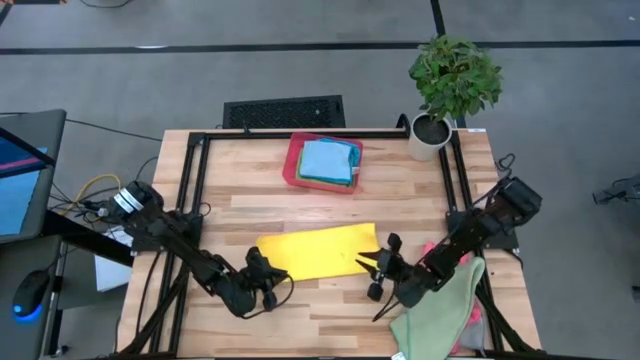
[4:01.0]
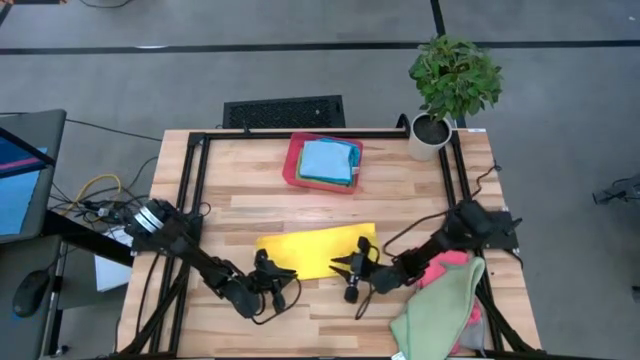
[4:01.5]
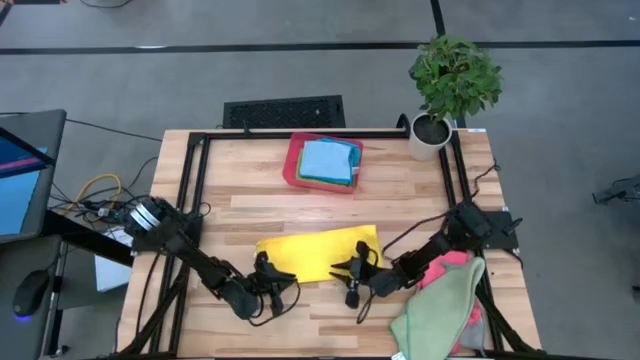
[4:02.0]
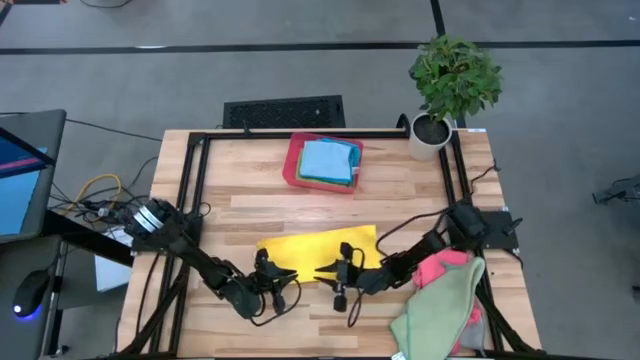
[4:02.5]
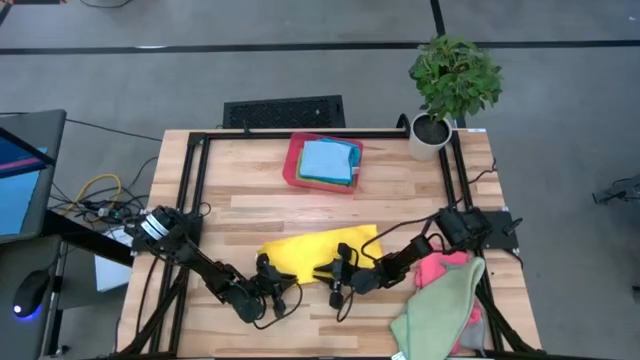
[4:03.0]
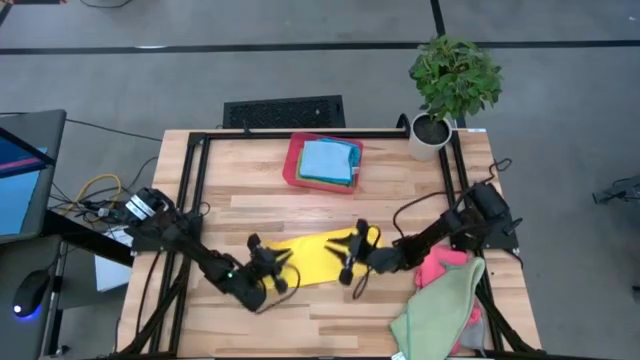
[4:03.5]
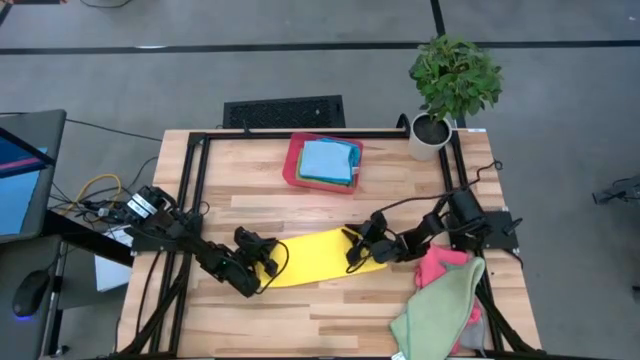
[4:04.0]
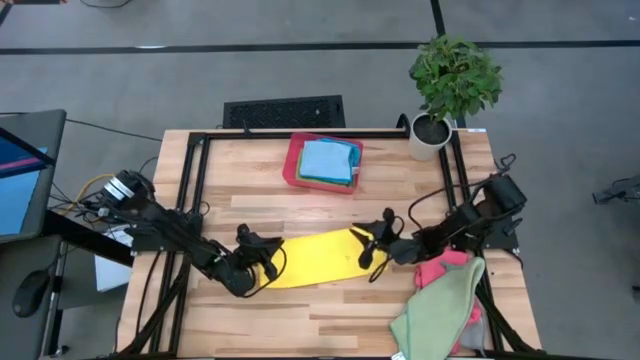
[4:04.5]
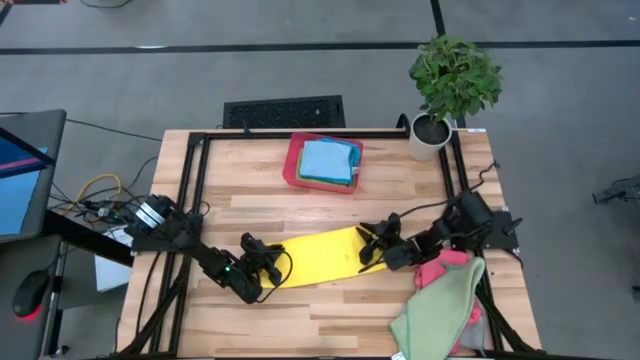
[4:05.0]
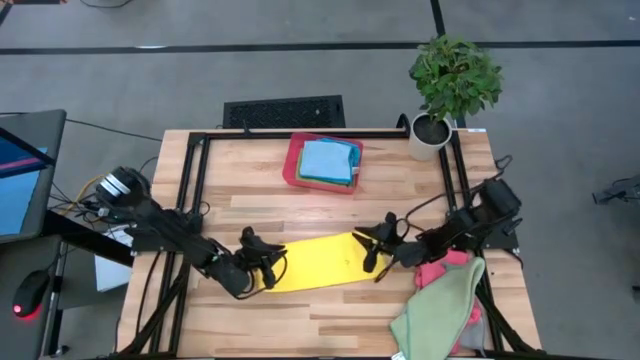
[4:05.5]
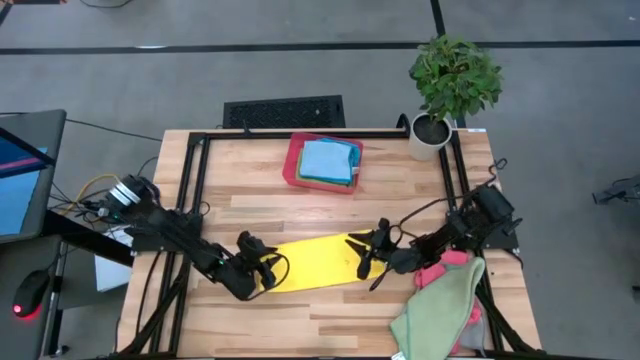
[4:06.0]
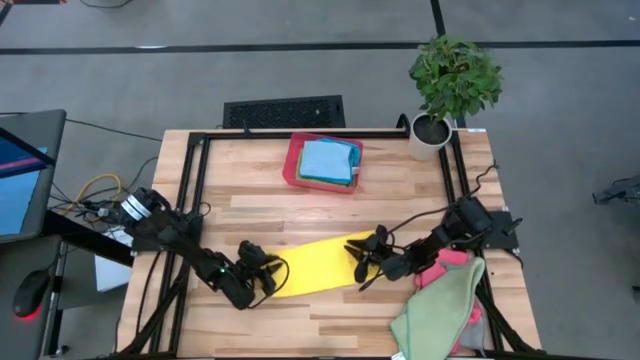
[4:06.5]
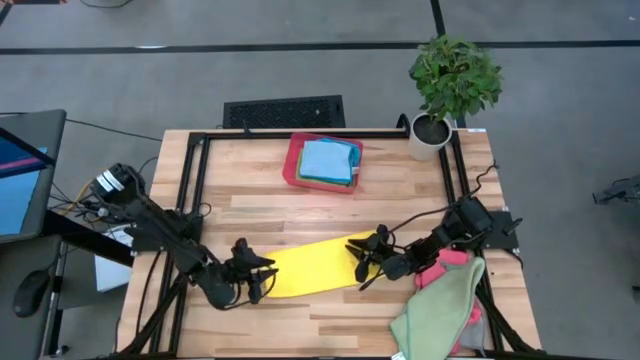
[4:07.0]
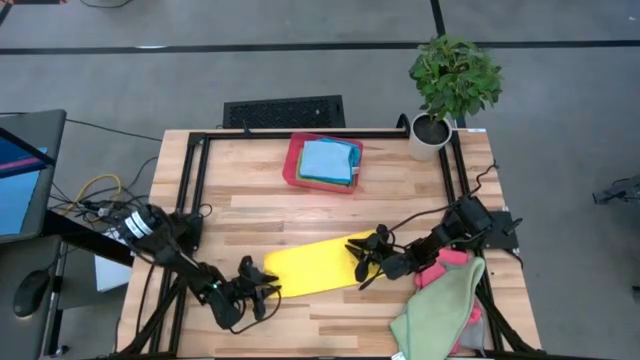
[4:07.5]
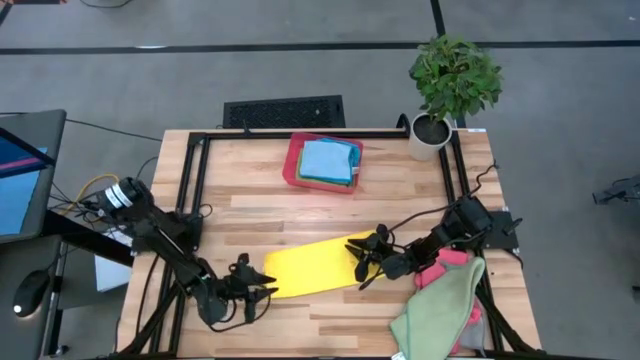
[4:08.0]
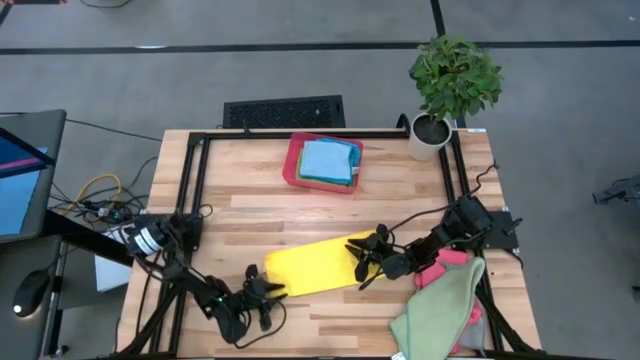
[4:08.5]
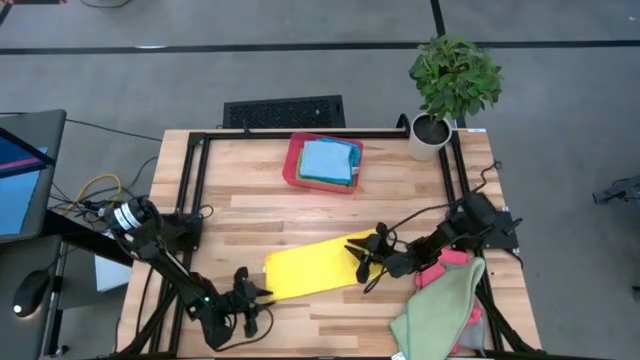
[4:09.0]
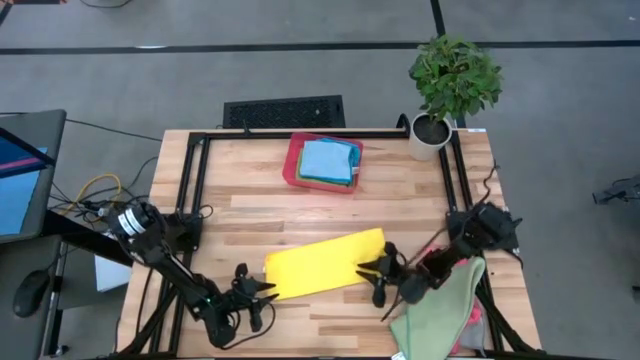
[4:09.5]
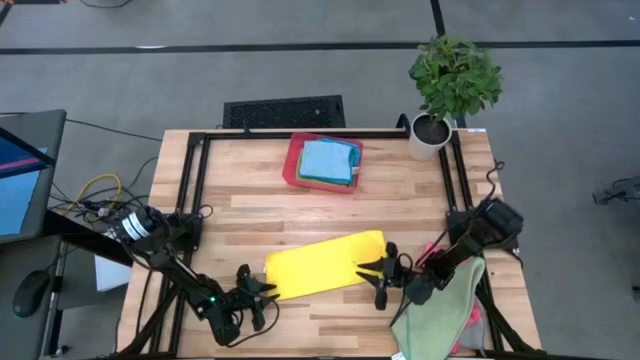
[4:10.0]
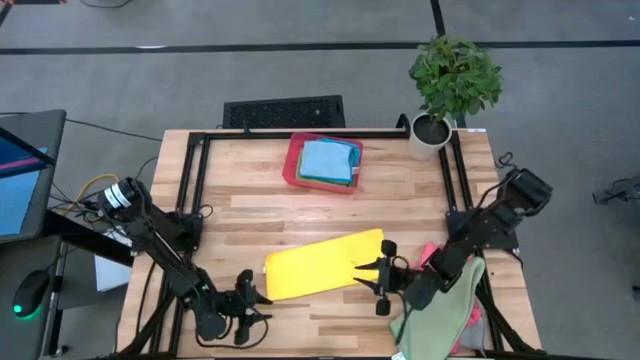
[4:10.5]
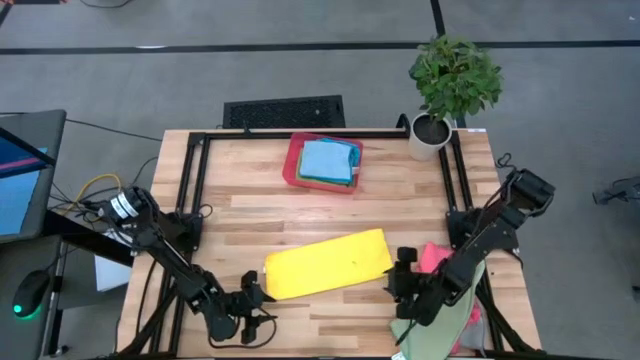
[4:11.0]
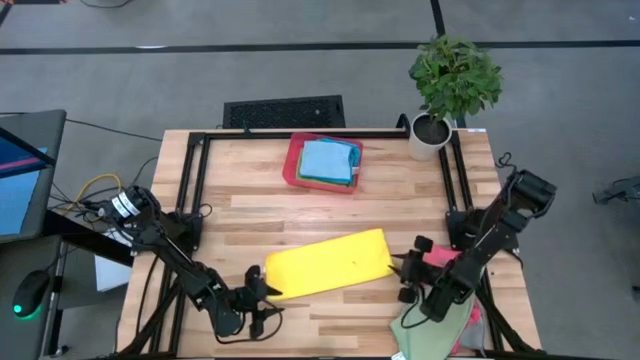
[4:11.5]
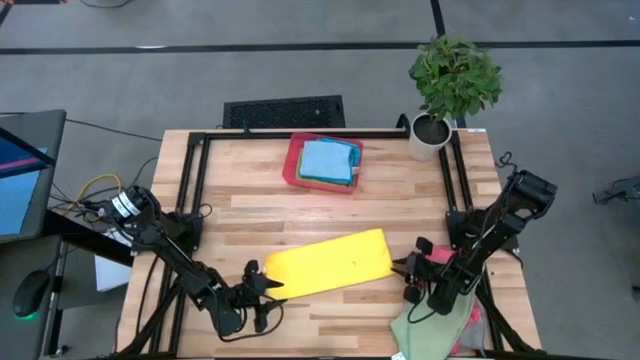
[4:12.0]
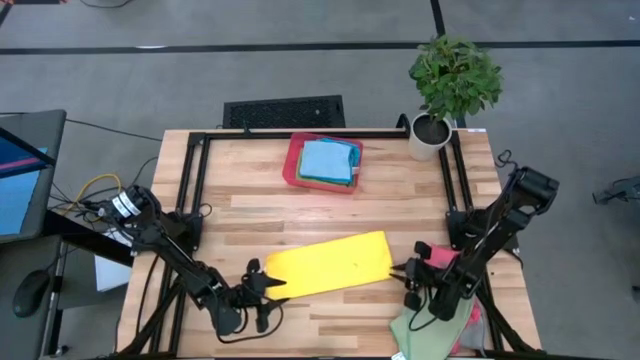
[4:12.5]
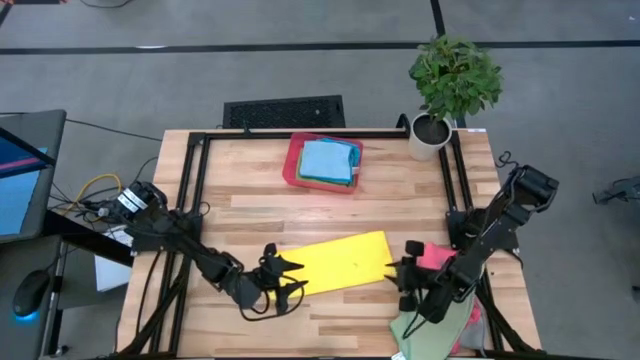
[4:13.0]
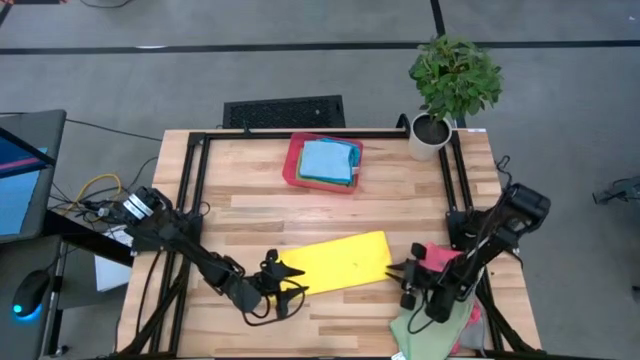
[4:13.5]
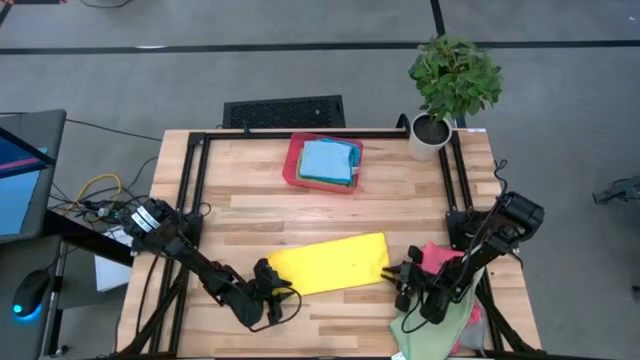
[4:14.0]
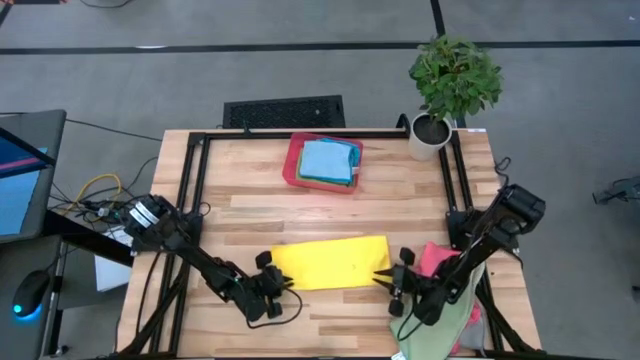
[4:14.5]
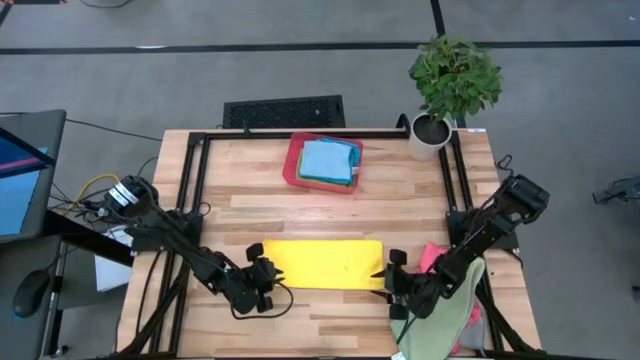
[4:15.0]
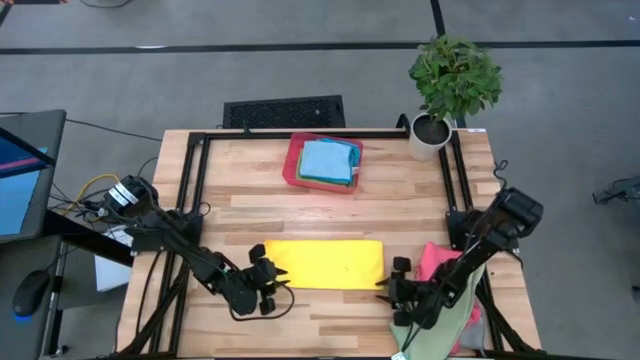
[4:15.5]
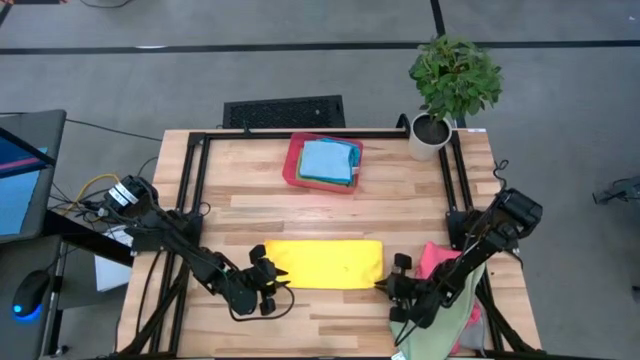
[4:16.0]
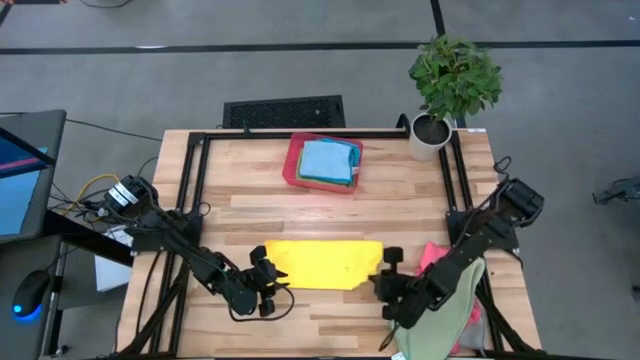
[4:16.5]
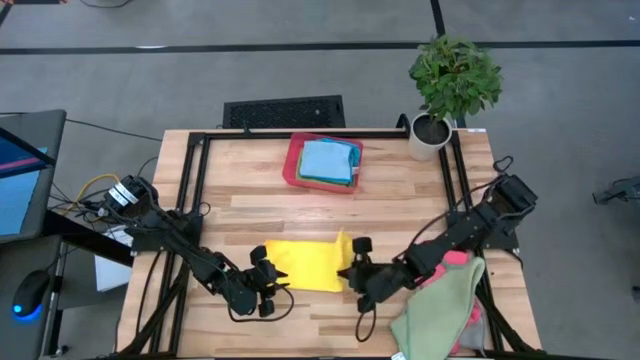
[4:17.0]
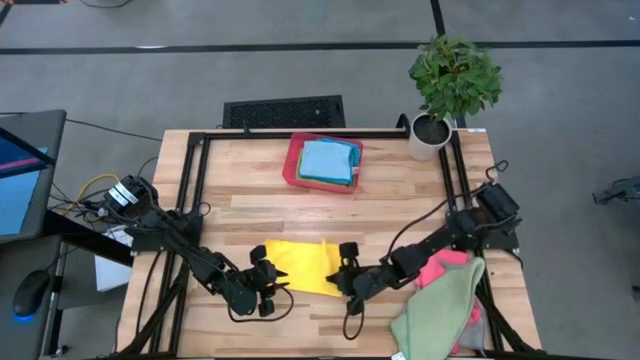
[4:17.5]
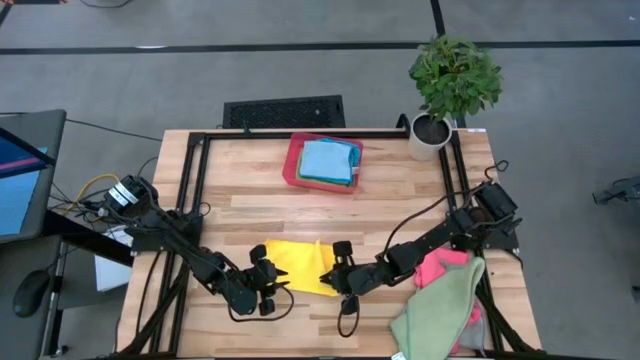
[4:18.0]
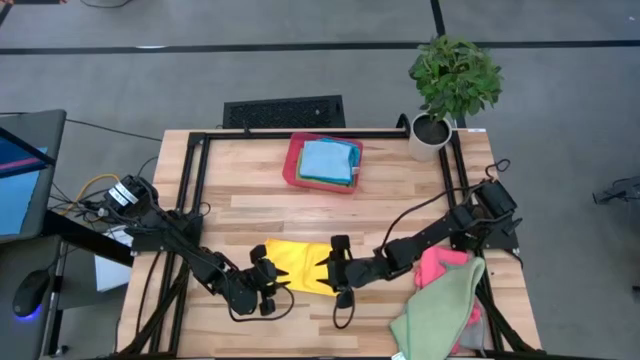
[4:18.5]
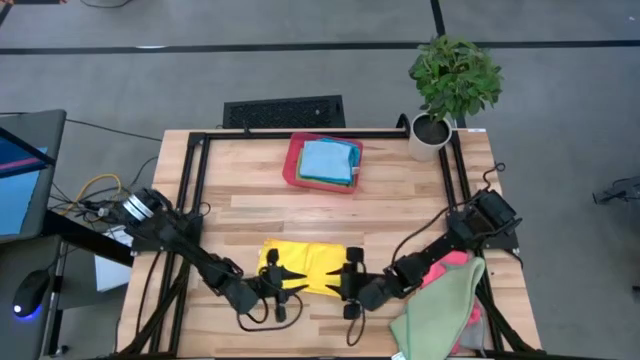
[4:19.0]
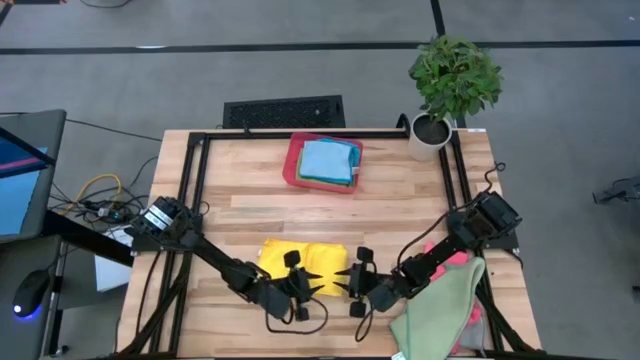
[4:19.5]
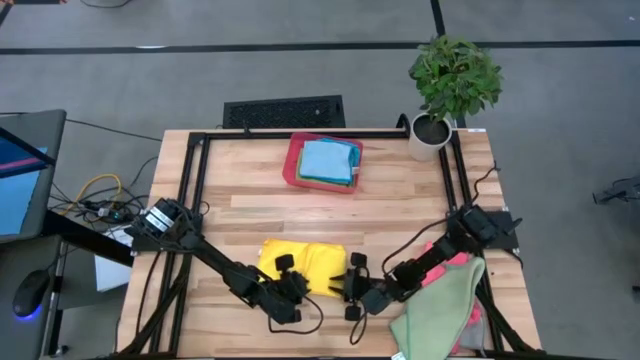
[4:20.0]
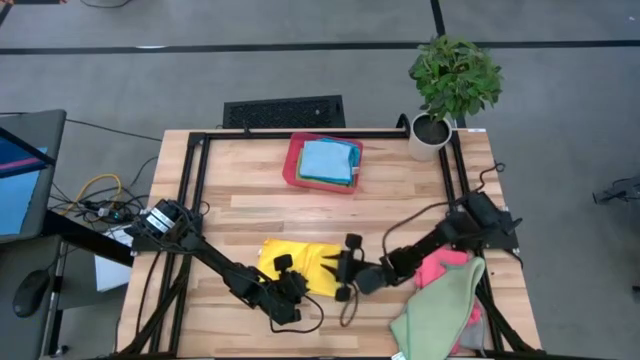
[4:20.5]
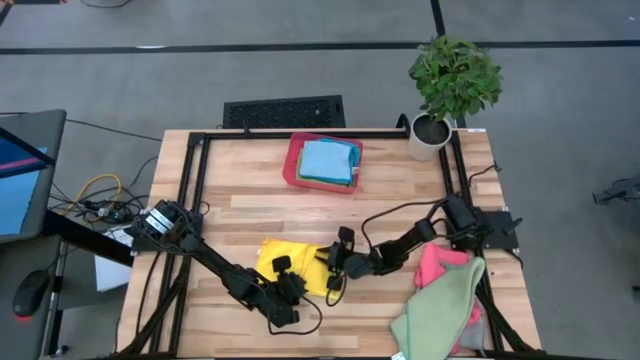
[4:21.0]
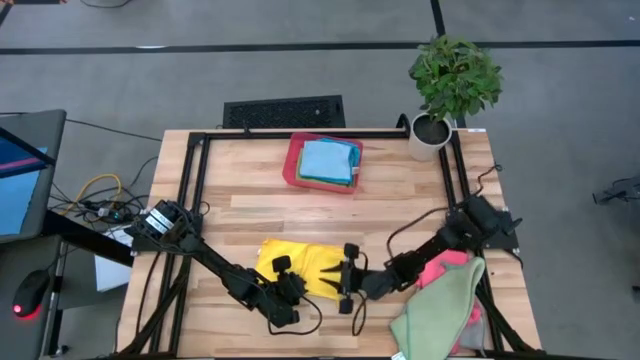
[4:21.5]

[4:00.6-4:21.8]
Task: Fold microfiber towels
Fold the yellow microfiber cloth

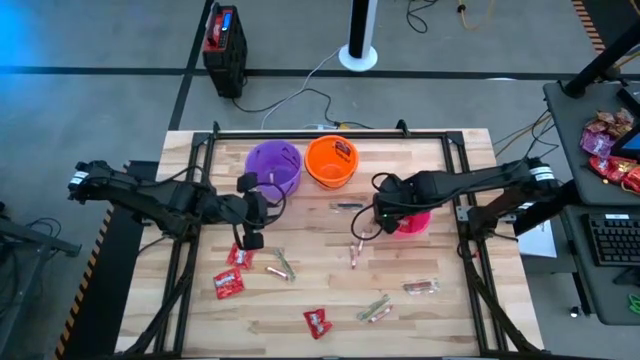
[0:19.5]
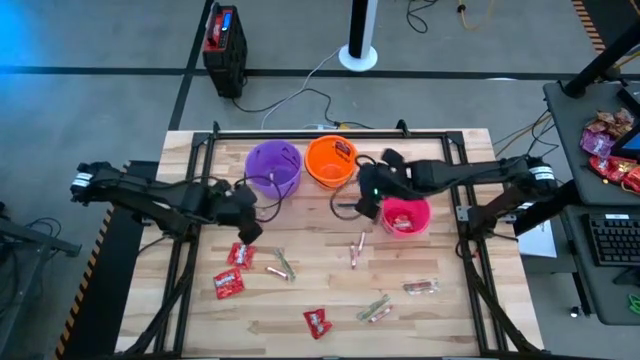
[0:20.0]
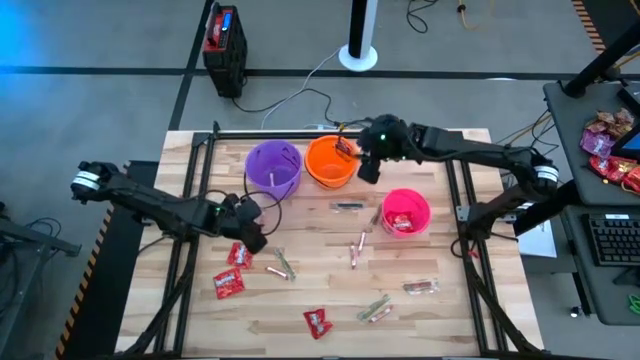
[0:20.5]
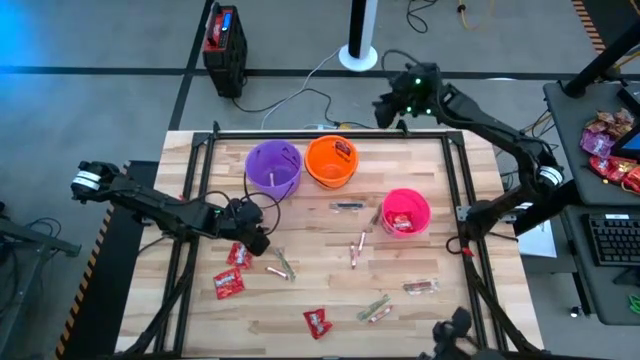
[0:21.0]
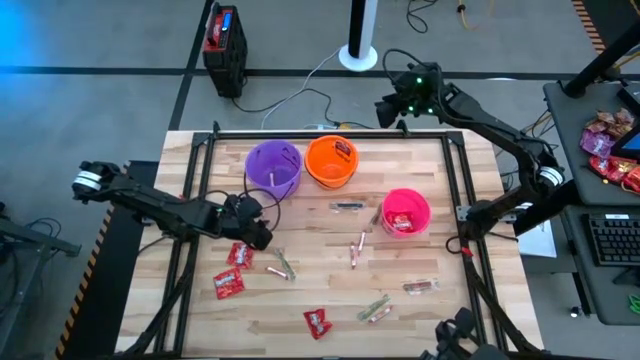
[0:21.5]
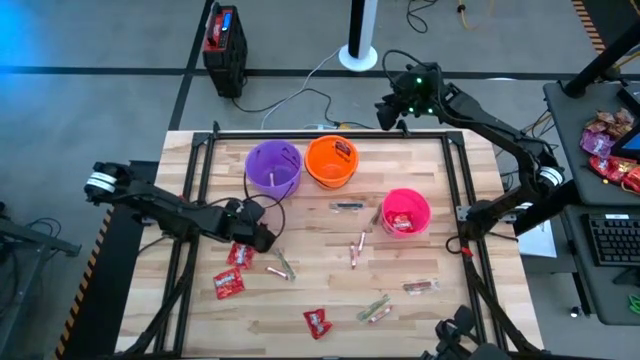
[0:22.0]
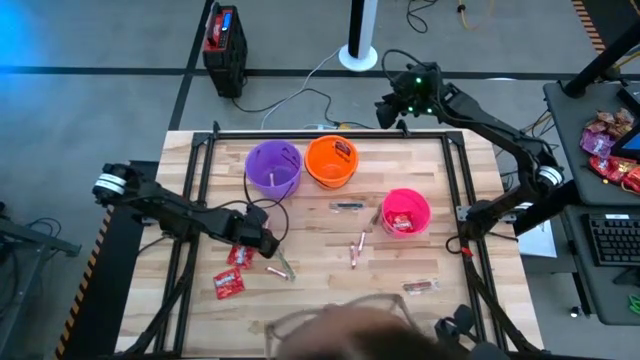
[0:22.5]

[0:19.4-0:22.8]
Task: Sort candy by brand, put in halloween buckets
Put the white candy into the violet bucket
